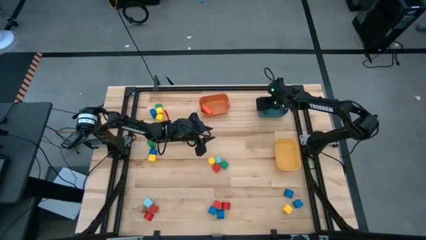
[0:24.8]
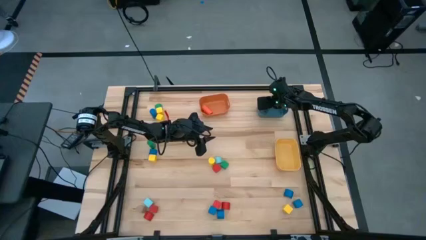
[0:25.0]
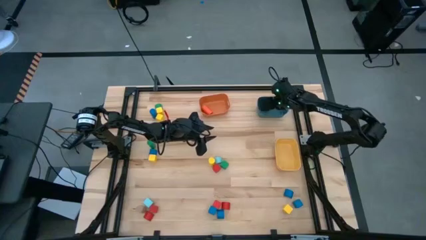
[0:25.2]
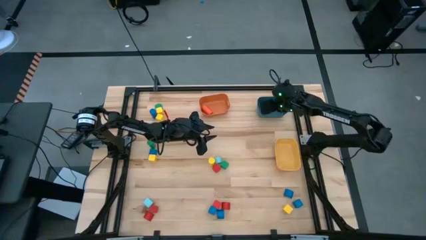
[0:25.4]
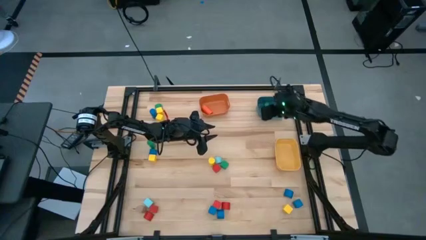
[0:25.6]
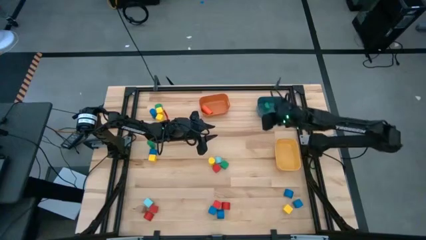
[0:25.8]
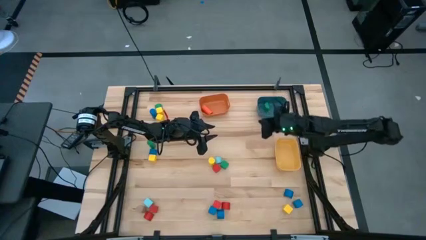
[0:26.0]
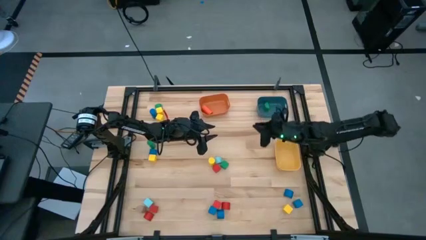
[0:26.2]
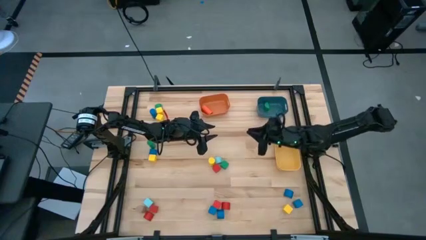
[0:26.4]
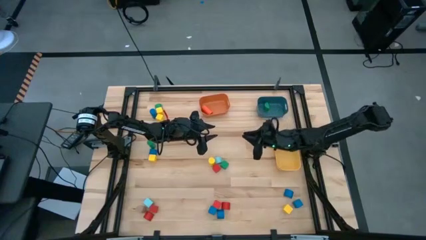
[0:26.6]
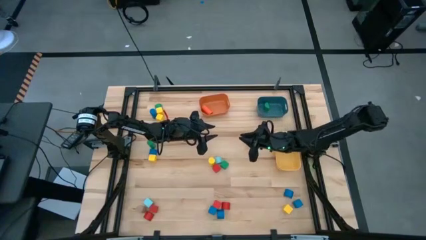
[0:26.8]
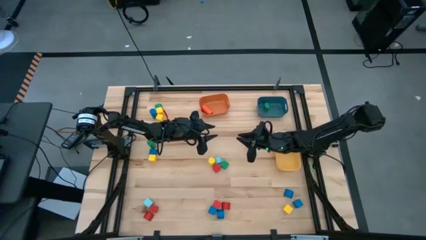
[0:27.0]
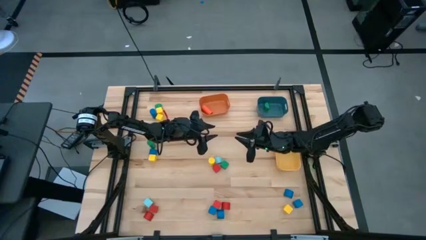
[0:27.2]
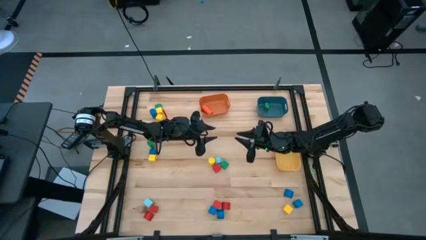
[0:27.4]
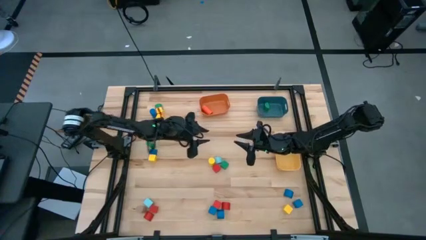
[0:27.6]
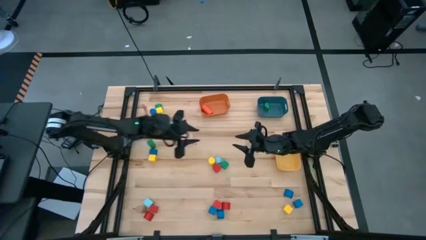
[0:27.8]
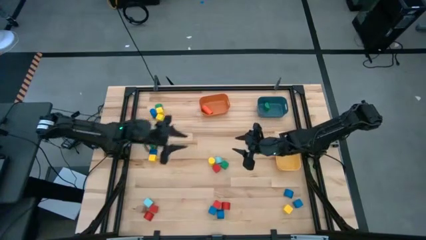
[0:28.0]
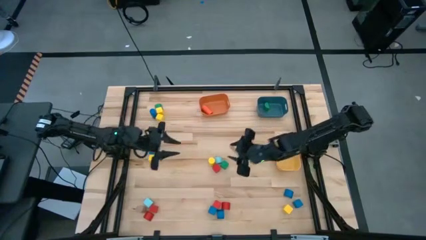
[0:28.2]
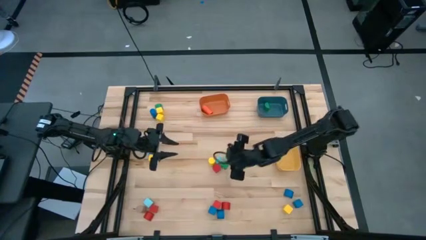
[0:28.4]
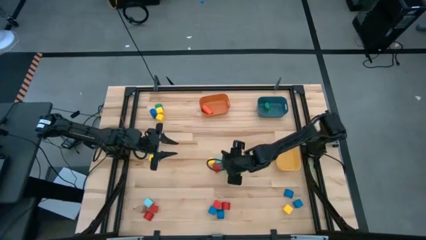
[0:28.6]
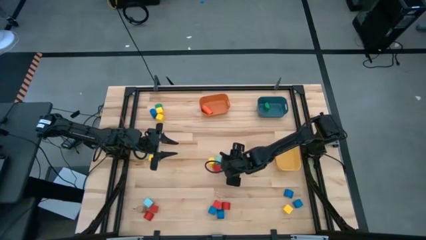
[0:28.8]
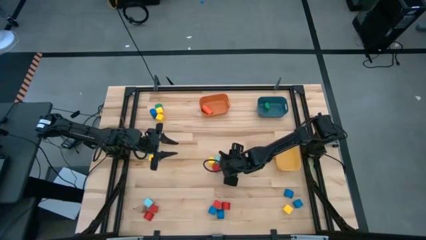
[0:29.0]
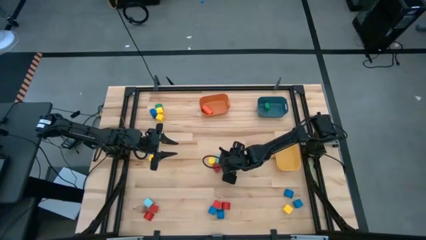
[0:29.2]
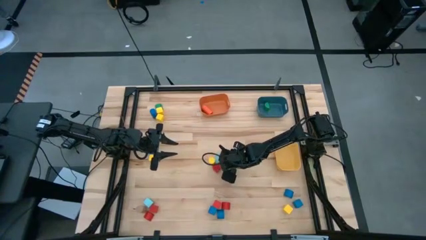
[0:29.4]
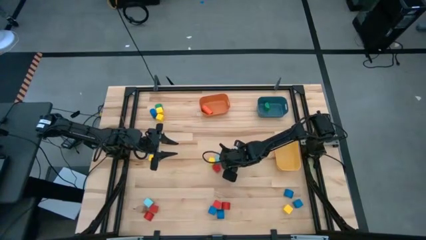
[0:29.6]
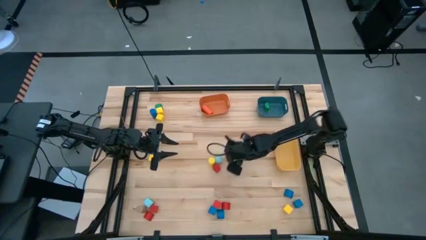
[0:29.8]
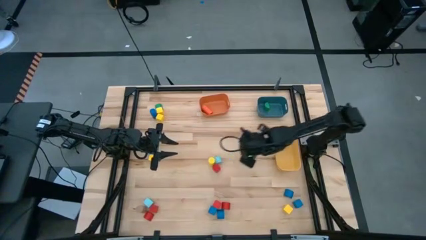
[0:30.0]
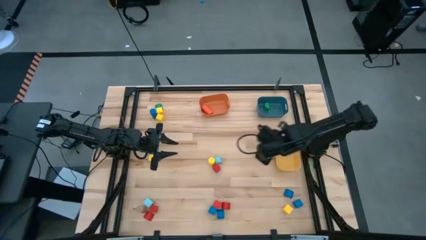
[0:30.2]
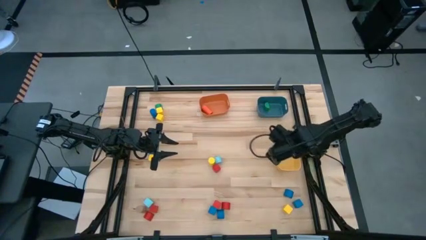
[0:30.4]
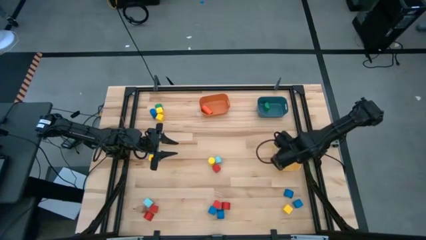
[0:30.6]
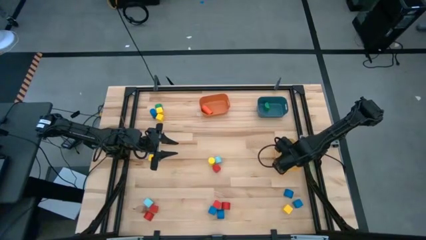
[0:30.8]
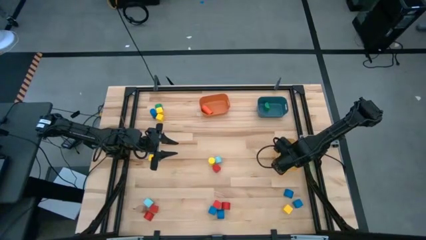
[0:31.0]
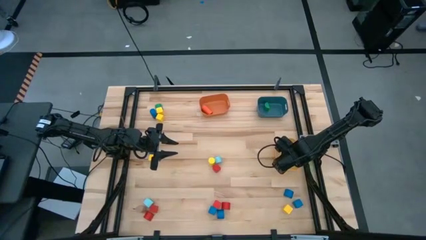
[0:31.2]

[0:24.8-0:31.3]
Task: Sort blocks by size
Put the green cube block into the yellow bin

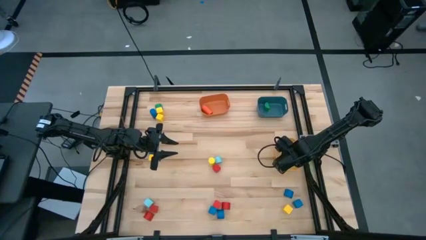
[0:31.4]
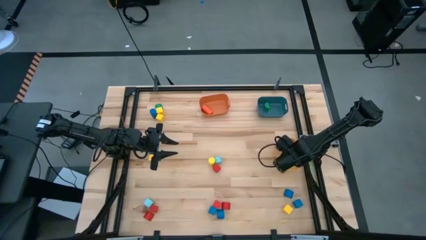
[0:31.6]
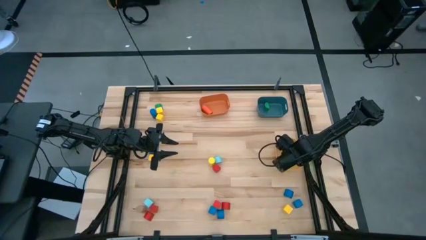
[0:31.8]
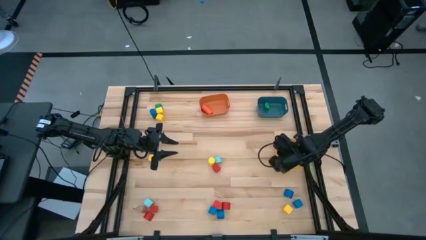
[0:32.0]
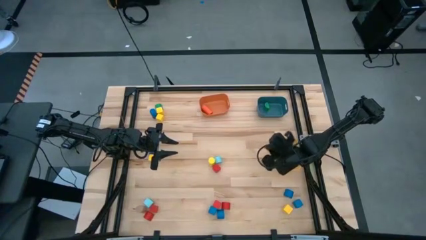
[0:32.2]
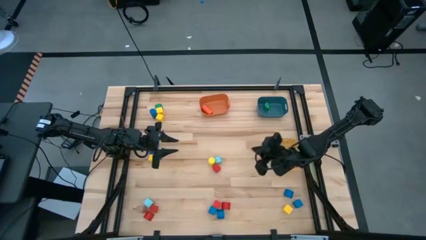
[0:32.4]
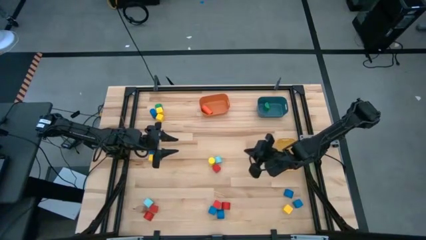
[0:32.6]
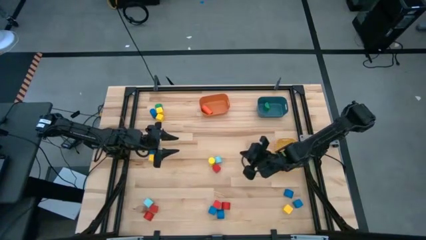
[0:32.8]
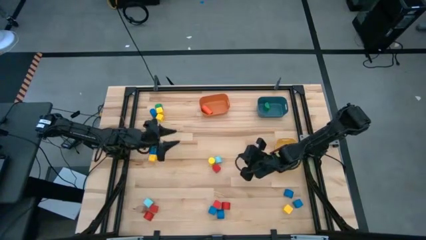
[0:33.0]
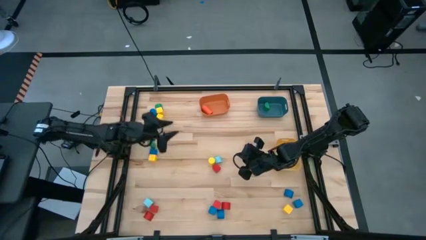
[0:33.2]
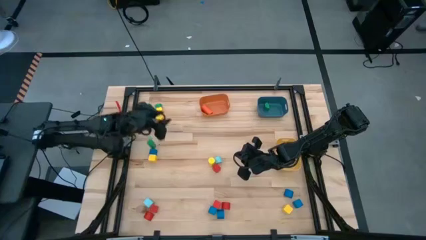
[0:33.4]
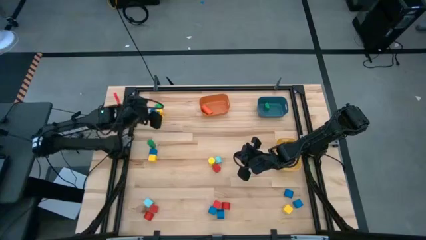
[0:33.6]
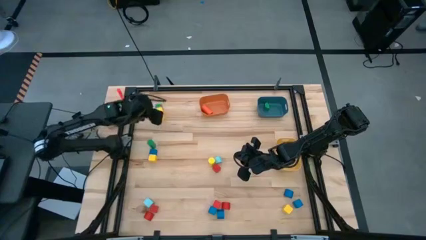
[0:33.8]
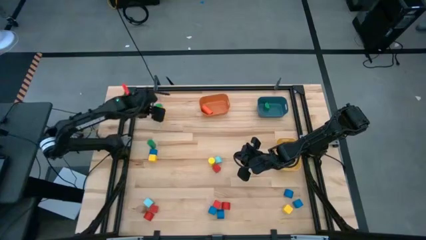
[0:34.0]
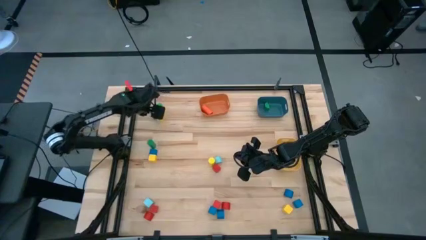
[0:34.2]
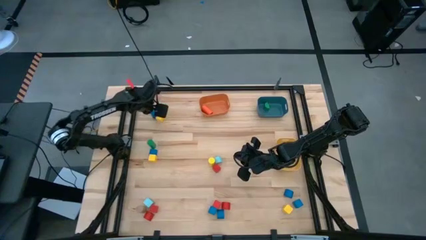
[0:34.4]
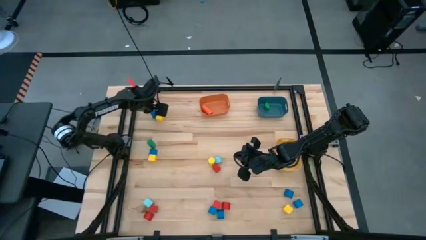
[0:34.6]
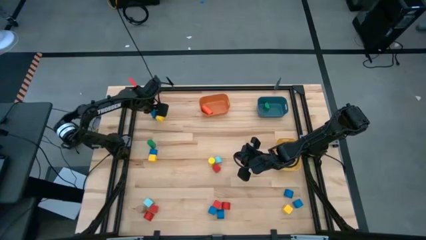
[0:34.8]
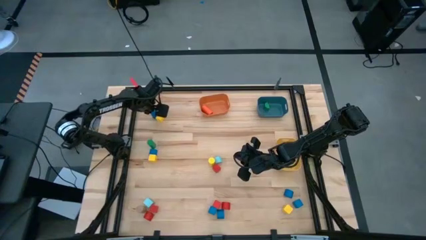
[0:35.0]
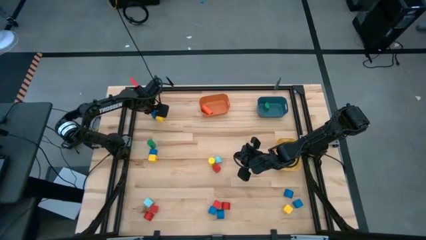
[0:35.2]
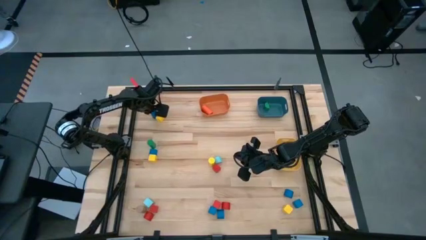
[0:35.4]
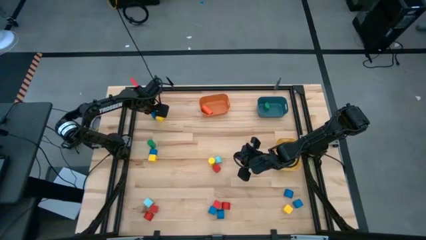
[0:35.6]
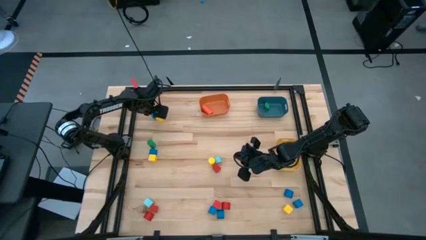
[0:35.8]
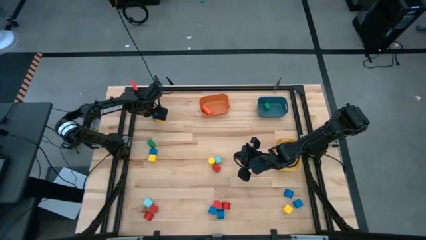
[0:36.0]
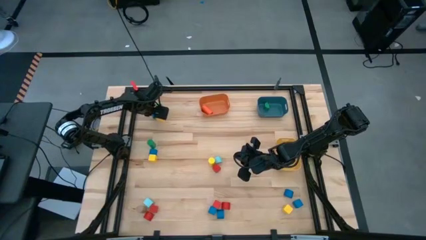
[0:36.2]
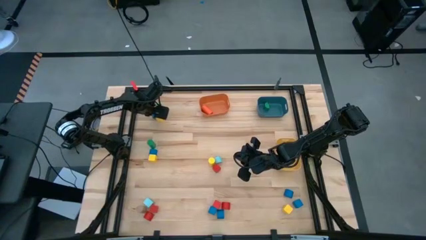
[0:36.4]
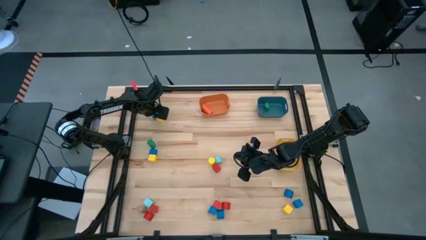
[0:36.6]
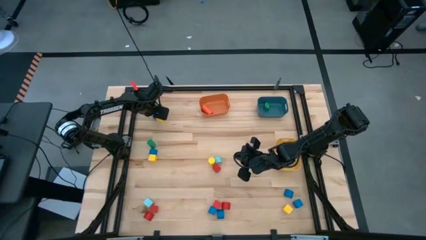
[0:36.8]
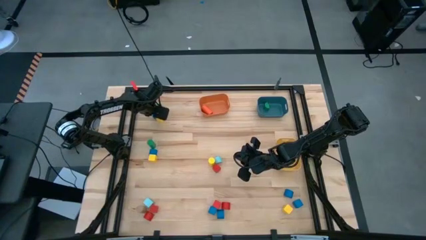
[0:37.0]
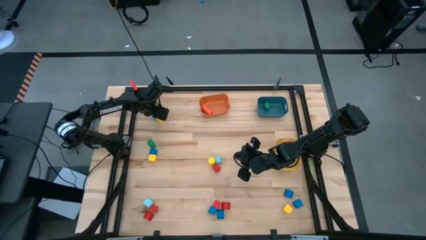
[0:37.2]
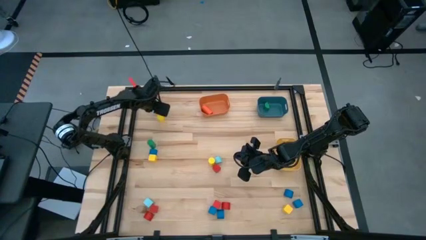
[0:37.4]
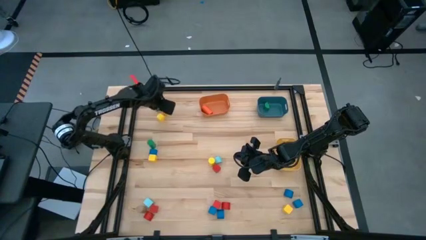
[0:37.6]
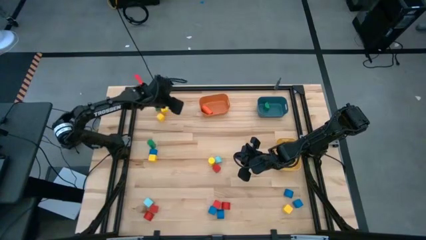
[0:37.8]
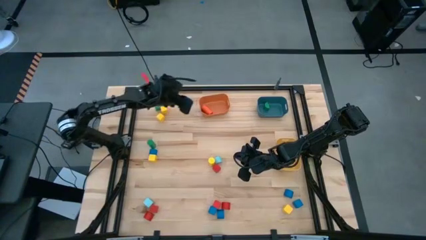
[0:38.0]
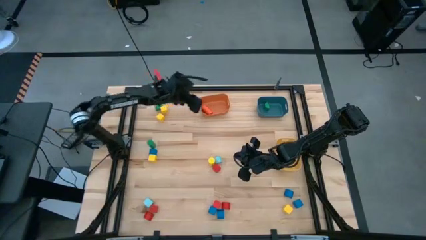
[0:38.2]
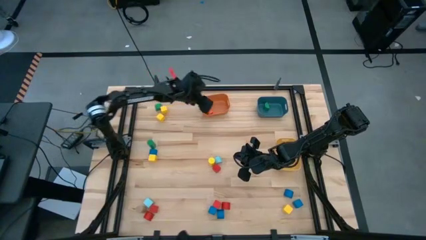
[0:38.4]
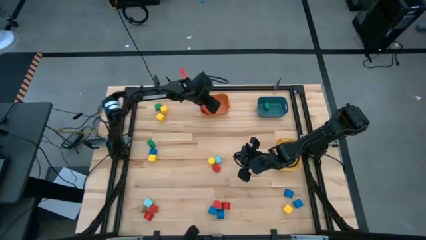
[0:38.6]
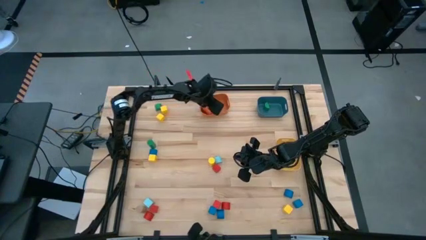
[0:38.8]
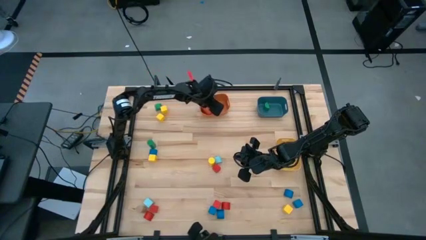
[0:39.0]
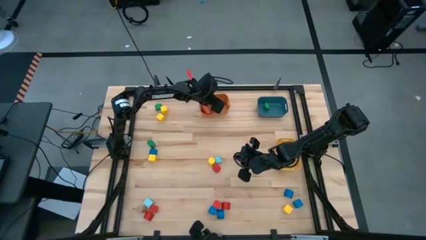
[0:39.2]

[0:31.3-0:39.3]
Put the blue cylinder block into the orange bin
